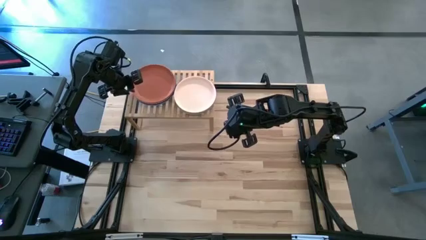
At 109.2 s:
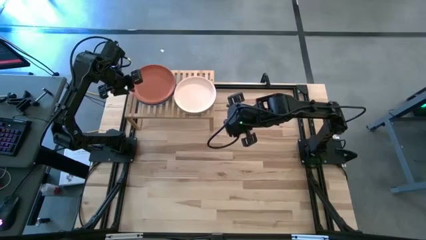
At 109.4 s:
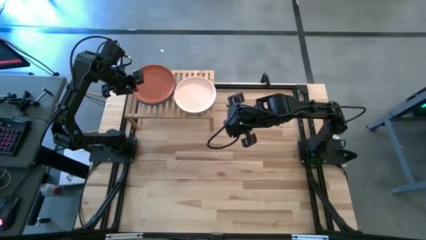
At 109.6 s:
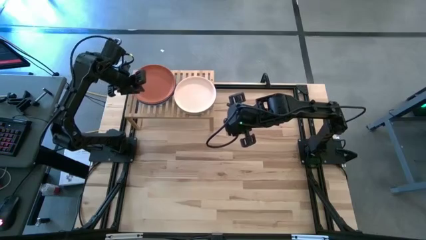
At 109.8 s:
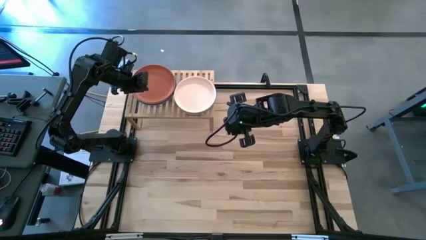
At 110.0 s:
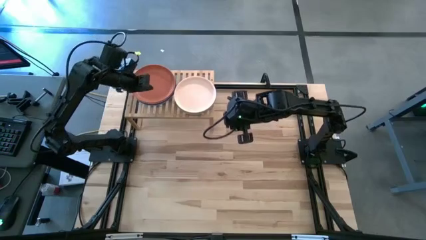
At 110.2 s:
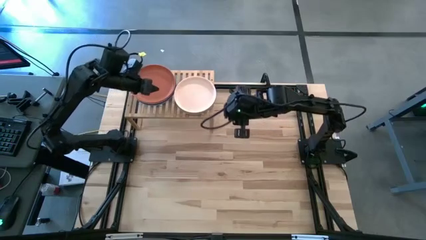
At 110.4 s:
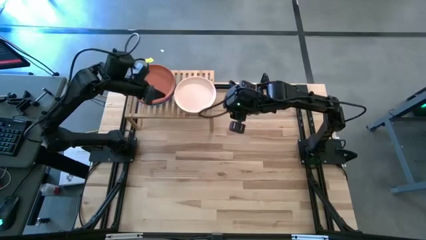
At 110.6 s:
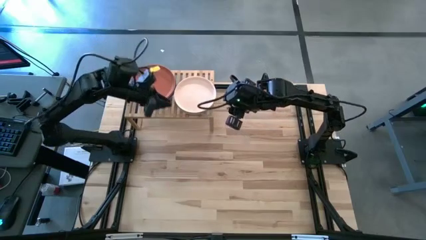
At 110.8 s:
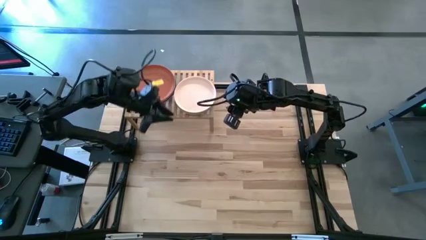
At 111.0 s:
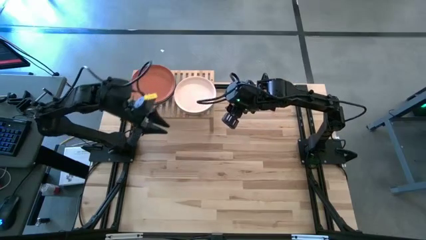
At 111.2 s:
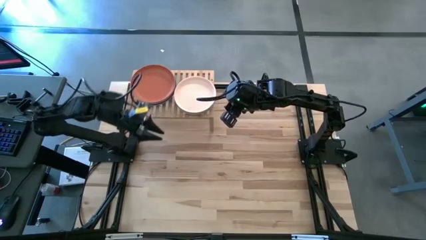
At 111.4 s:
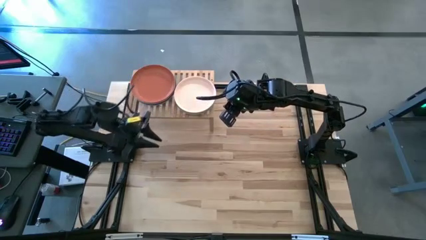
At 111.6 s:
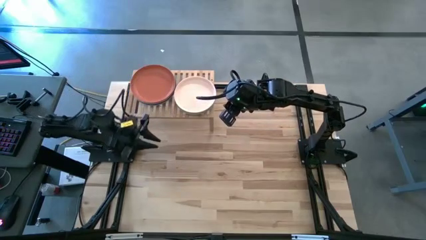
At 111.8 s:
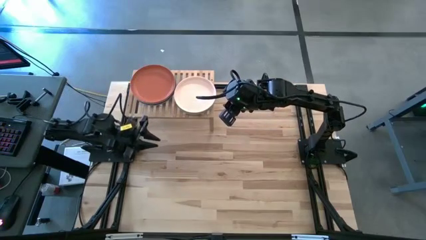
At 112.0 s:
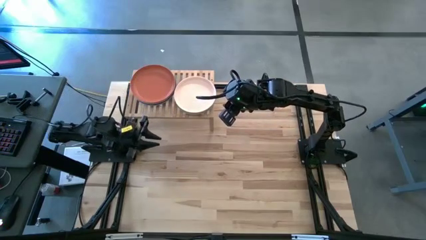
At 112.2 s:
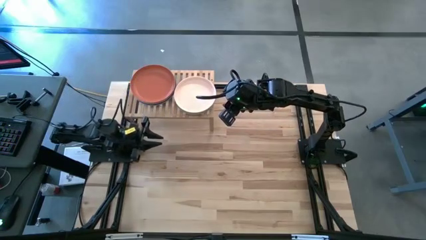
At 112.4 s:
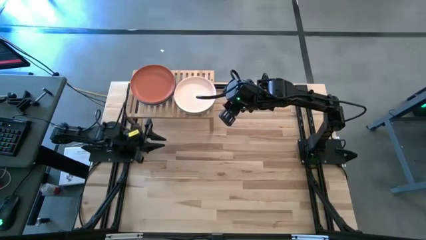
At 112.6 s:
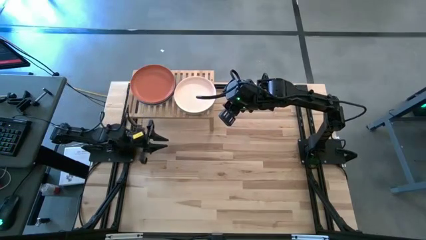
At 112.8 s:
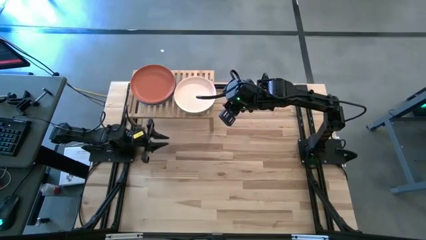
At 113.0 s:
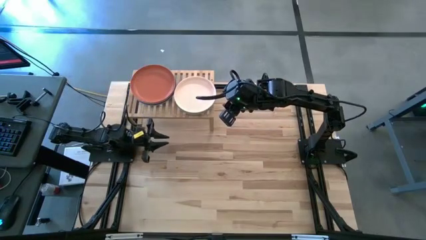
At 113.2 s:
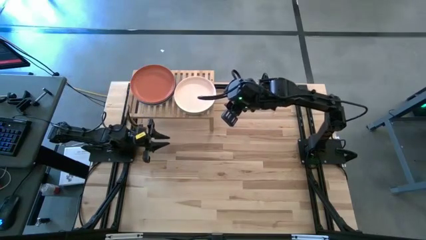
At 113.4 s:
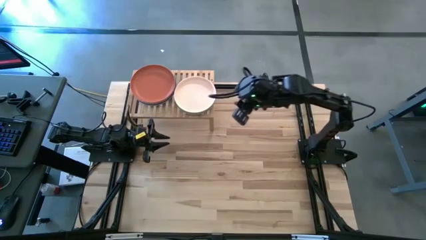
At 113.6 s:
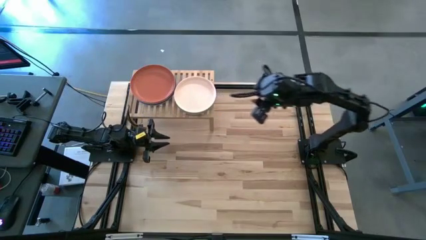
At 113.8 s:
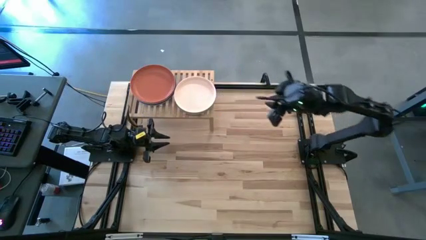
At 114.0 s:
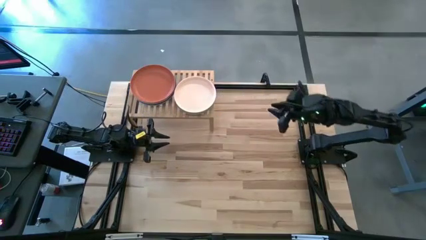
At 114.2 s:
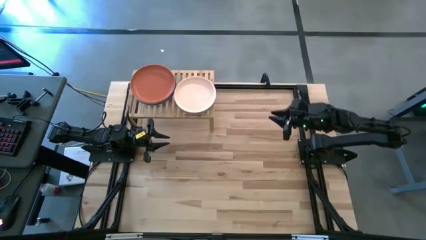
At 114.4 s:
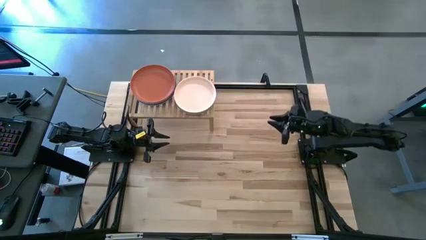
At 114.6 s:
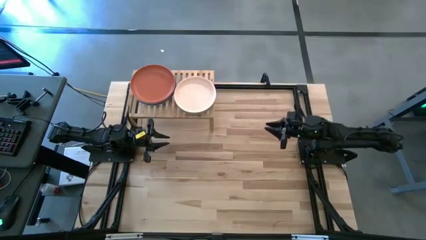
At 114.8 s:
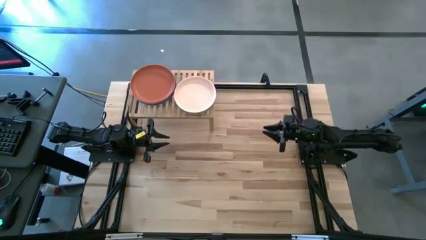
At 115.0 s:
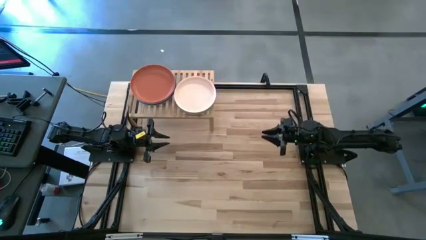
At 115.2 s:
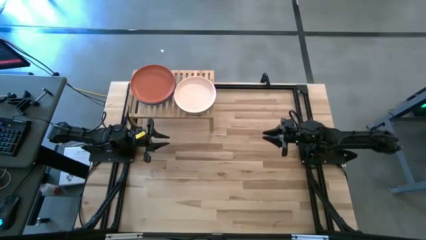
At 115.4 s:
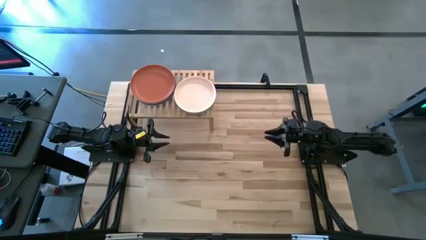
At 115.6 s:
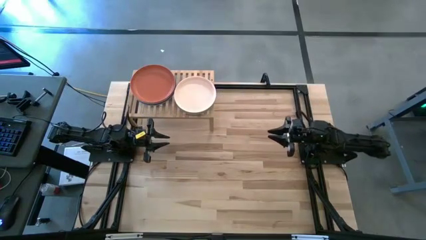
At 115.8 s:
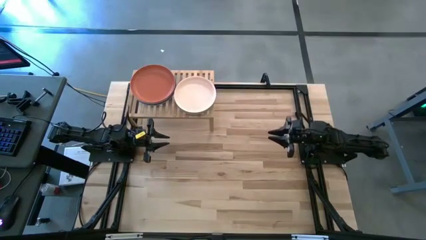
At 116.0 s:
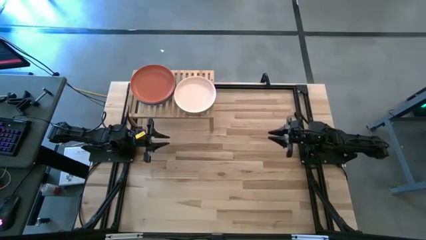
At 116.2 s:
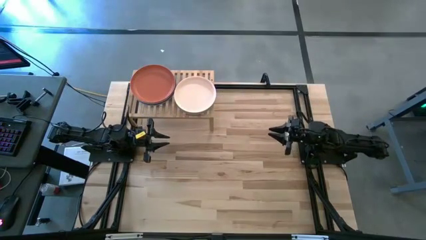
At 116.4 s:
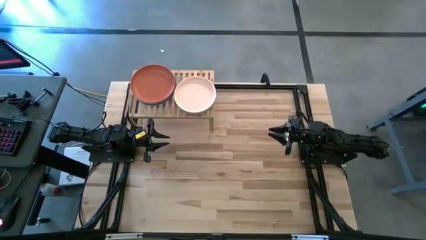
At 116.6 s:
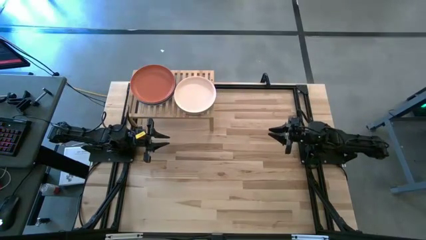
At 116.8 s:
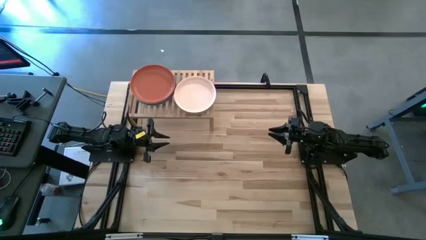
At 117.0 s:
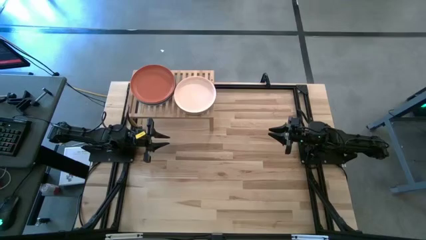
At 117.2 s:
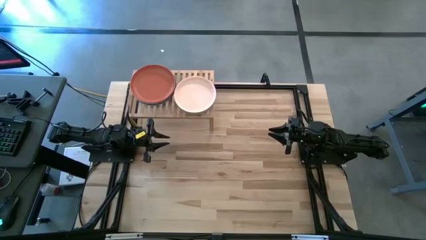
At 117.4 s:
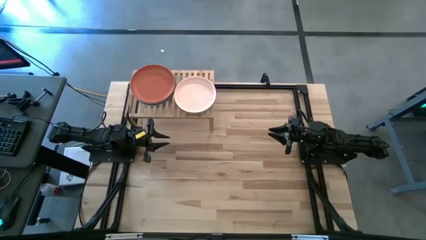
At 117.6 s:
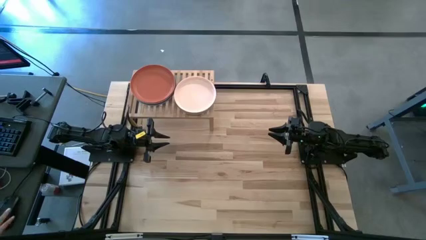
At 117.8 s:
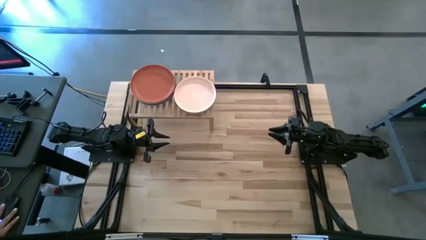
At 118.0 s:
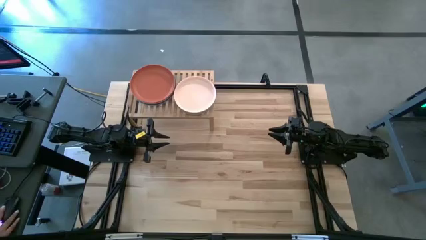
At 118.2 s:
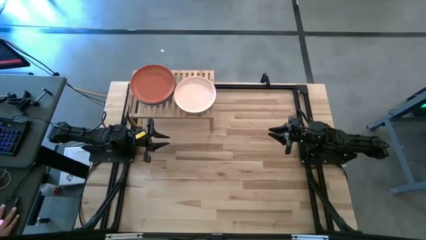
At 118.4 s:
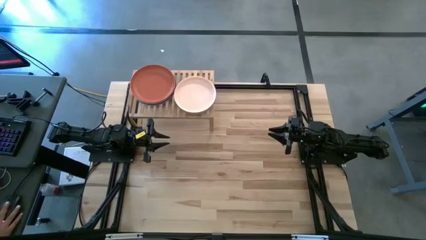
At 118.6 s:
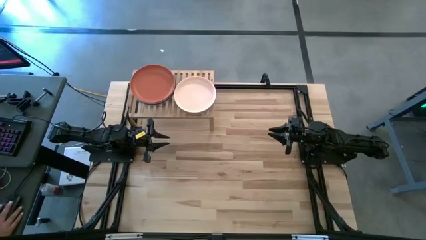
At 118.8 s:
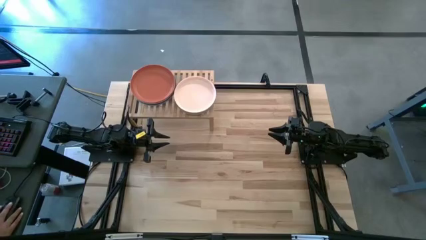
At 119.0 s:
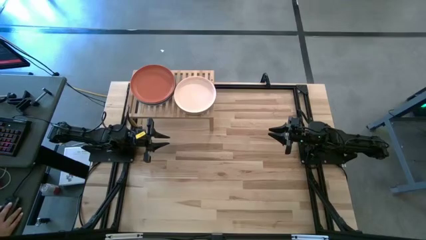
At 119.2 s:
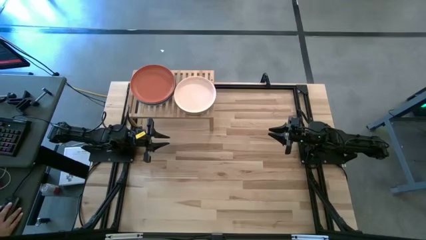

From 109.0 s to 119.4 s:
Task: Place and stack plates onto a shelf
Return To Home Position
